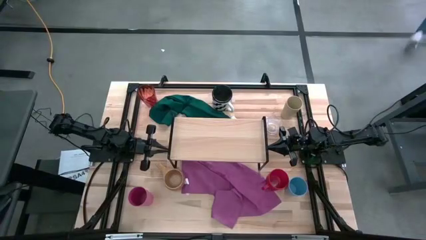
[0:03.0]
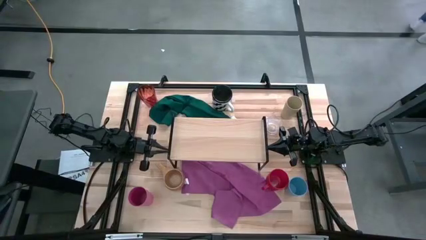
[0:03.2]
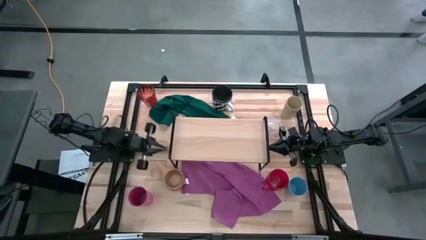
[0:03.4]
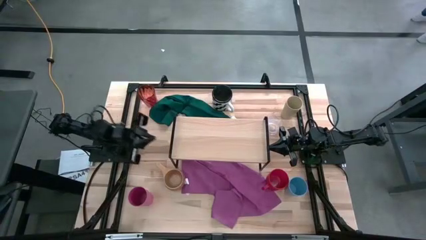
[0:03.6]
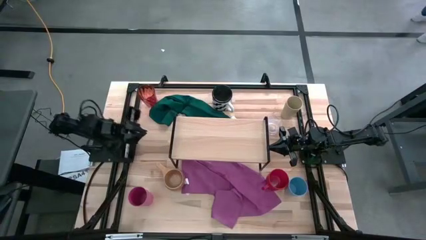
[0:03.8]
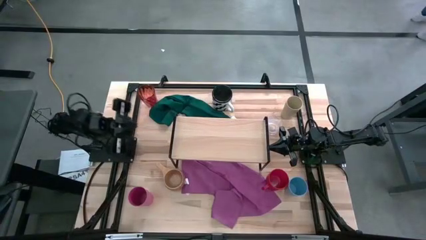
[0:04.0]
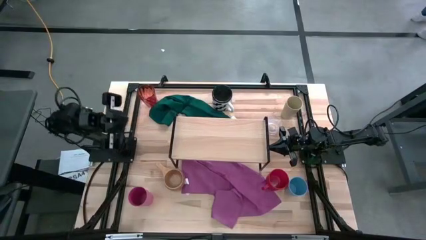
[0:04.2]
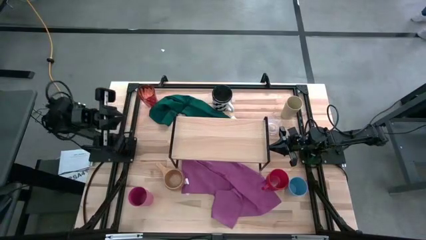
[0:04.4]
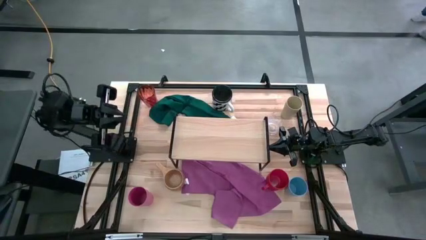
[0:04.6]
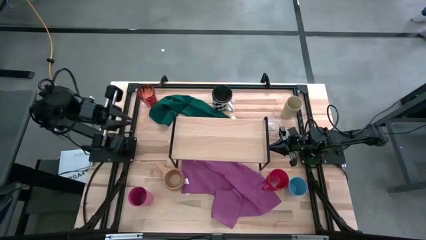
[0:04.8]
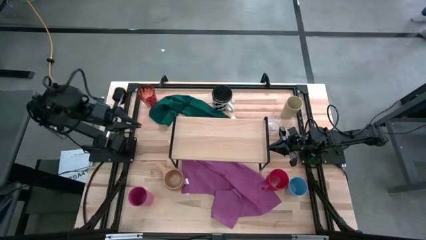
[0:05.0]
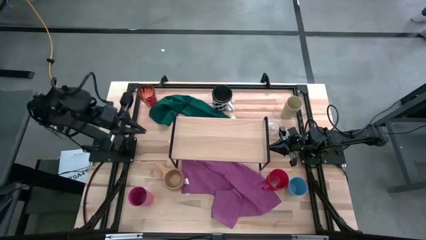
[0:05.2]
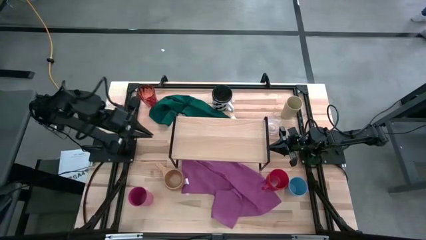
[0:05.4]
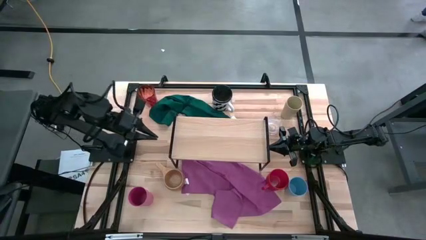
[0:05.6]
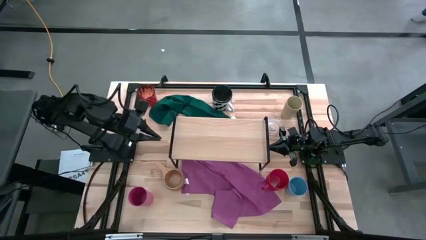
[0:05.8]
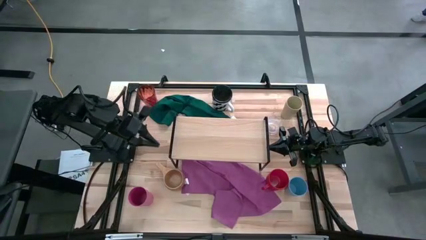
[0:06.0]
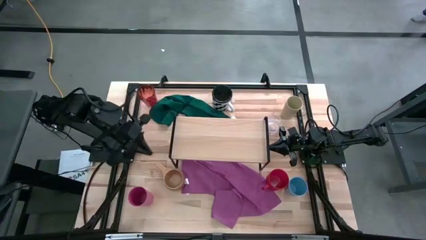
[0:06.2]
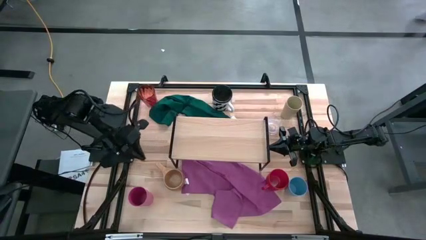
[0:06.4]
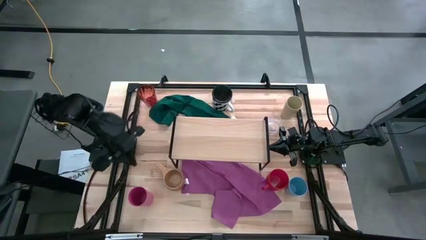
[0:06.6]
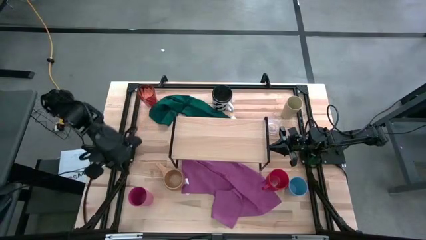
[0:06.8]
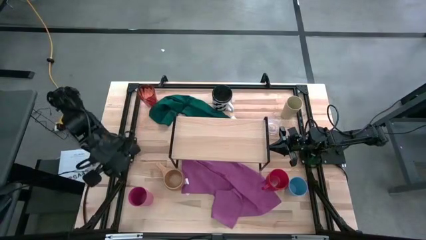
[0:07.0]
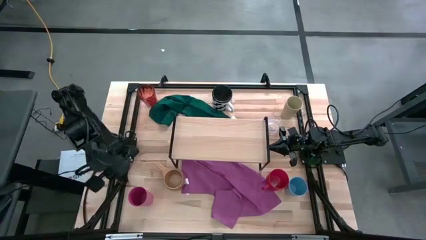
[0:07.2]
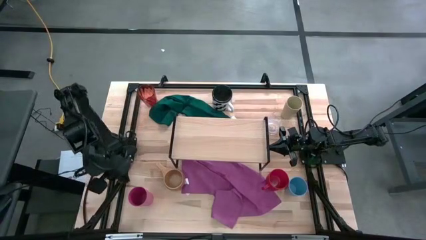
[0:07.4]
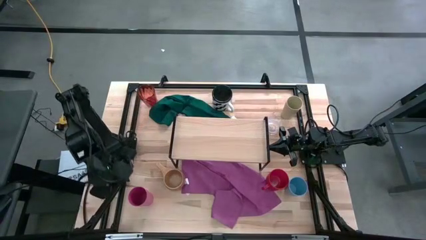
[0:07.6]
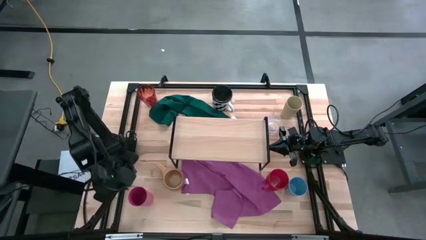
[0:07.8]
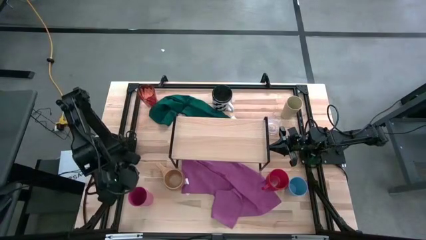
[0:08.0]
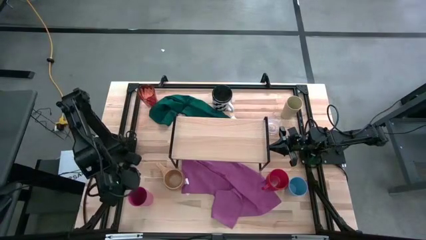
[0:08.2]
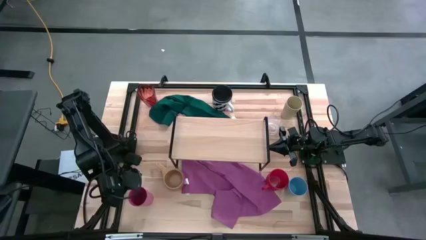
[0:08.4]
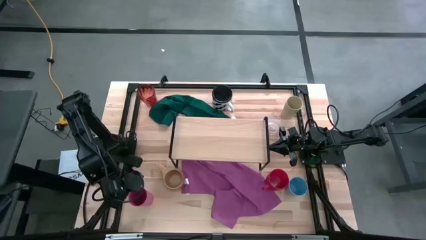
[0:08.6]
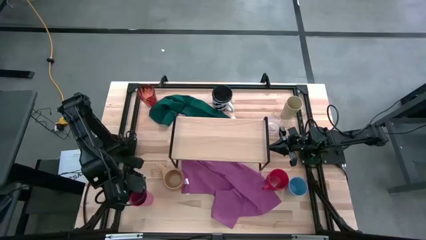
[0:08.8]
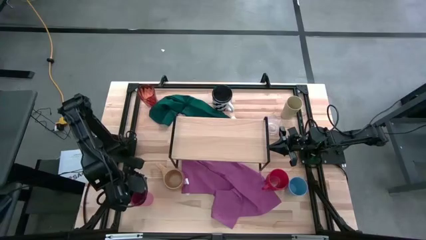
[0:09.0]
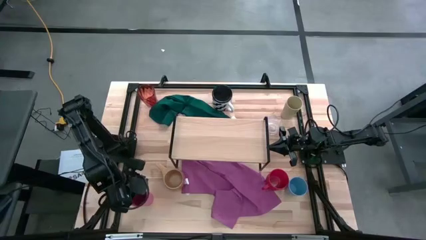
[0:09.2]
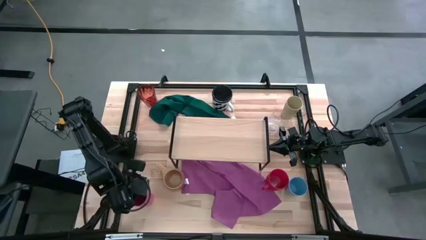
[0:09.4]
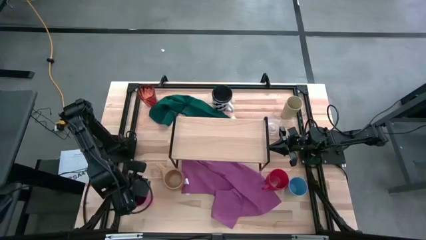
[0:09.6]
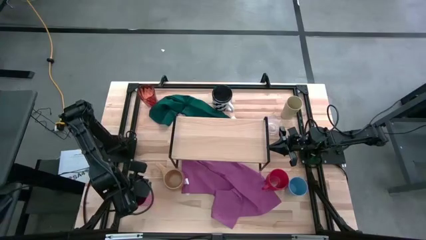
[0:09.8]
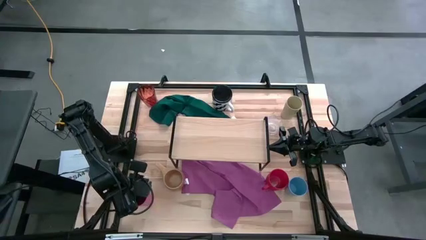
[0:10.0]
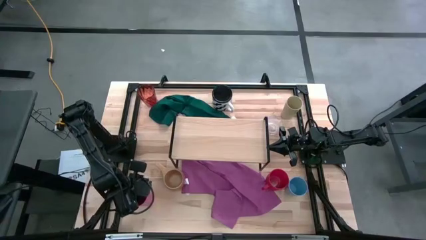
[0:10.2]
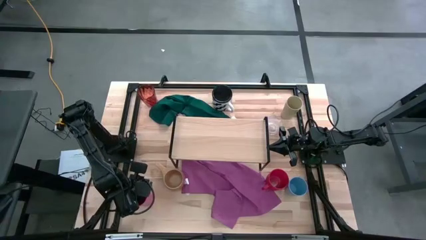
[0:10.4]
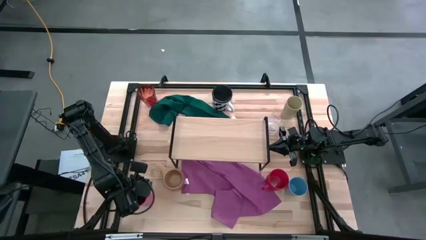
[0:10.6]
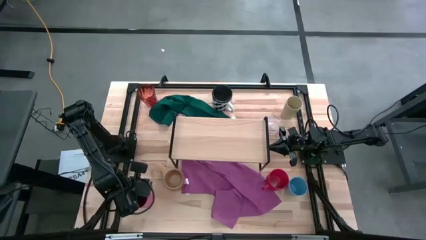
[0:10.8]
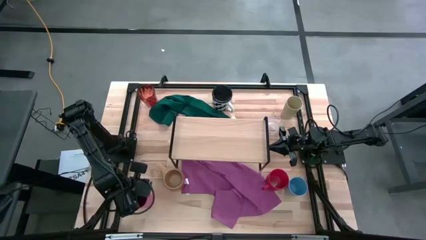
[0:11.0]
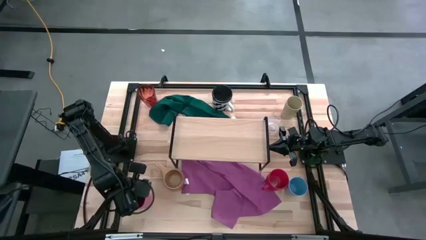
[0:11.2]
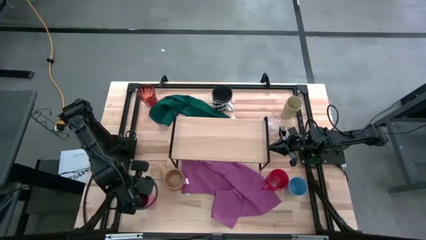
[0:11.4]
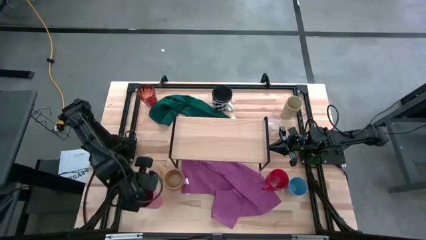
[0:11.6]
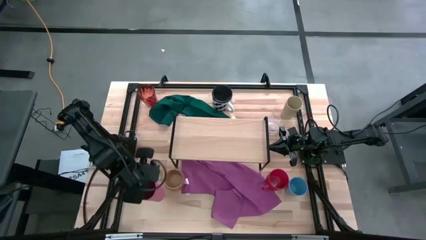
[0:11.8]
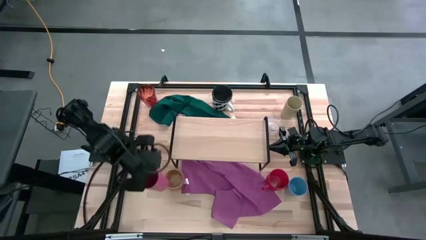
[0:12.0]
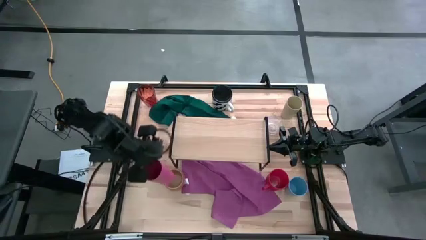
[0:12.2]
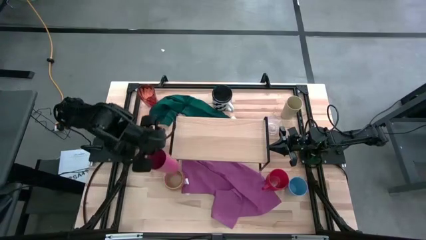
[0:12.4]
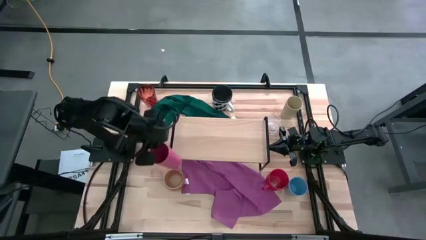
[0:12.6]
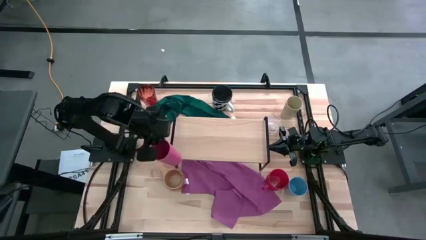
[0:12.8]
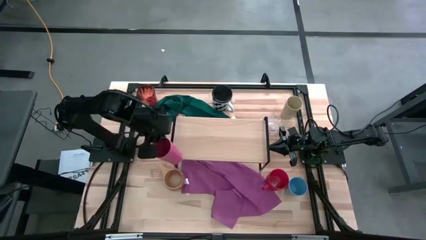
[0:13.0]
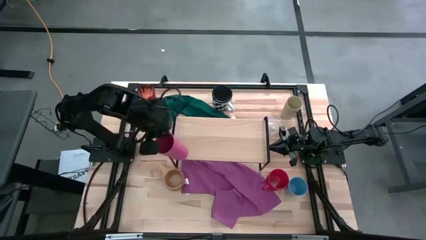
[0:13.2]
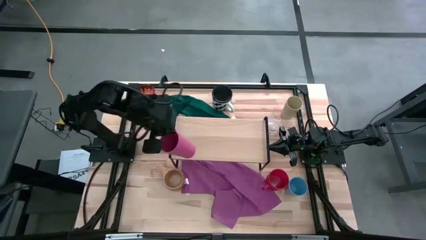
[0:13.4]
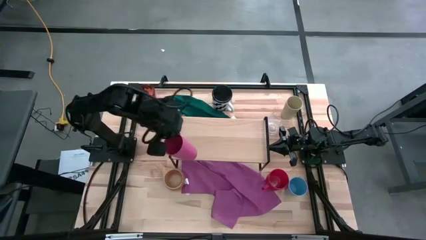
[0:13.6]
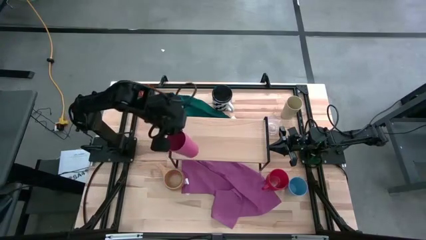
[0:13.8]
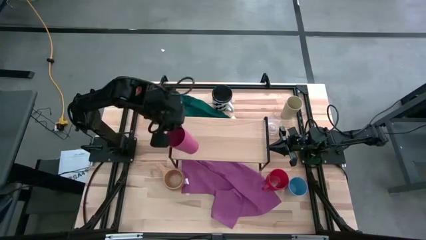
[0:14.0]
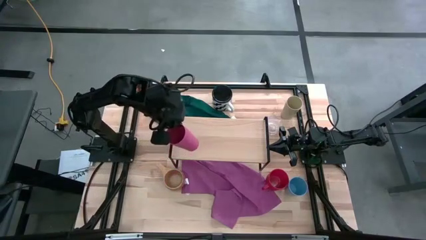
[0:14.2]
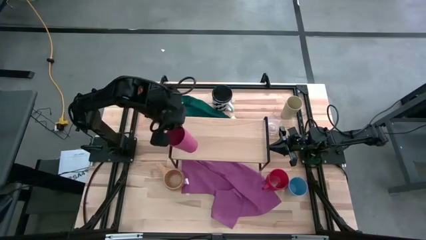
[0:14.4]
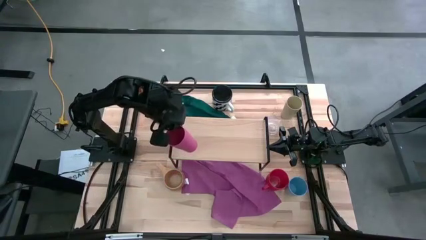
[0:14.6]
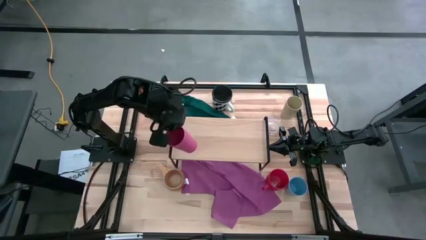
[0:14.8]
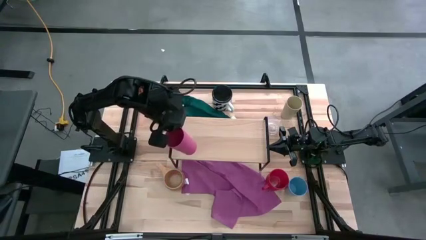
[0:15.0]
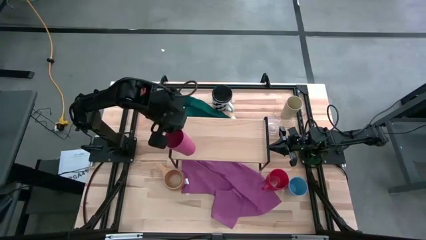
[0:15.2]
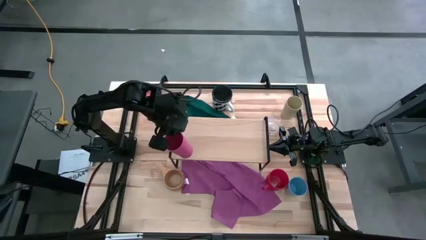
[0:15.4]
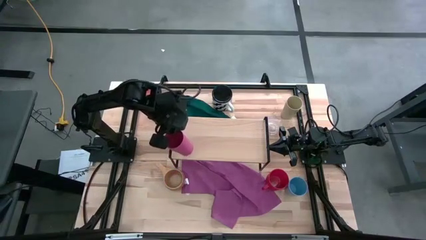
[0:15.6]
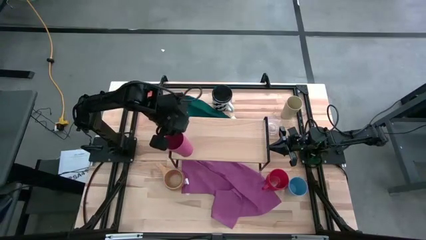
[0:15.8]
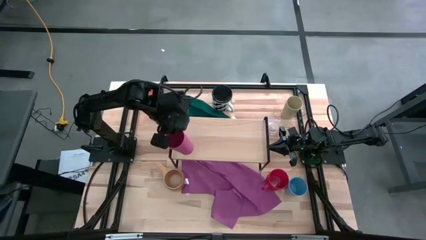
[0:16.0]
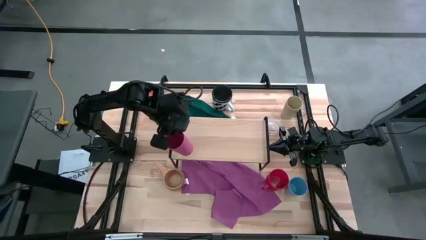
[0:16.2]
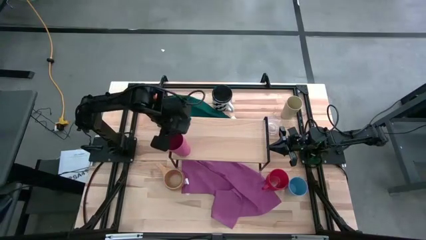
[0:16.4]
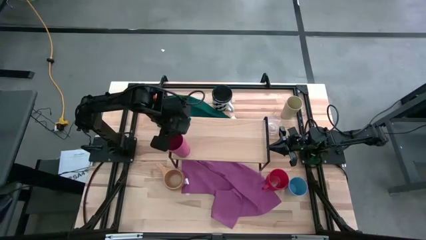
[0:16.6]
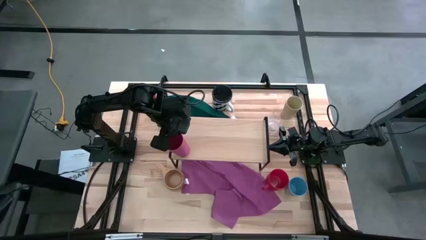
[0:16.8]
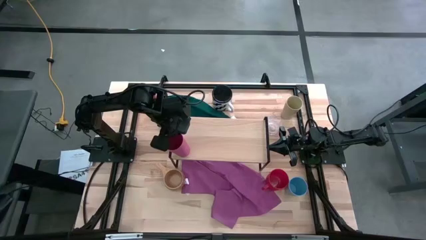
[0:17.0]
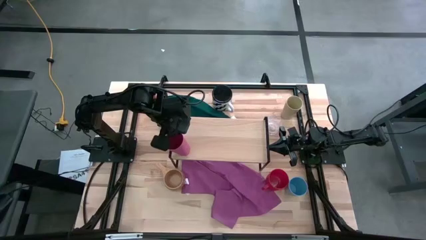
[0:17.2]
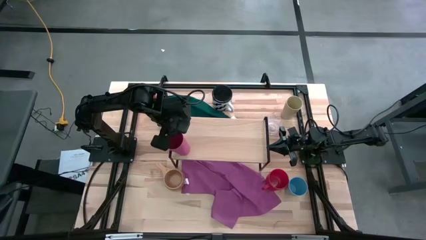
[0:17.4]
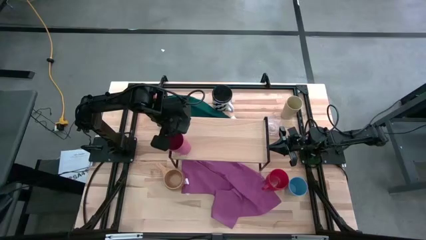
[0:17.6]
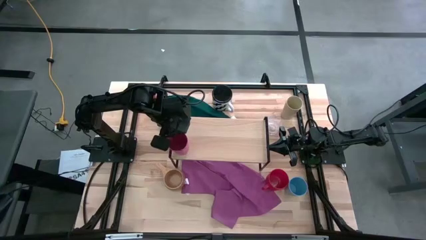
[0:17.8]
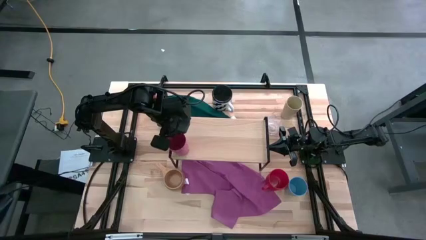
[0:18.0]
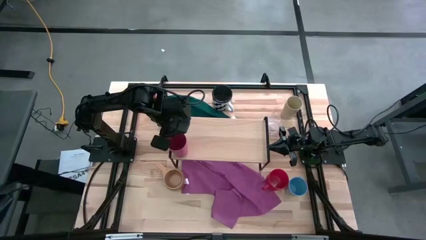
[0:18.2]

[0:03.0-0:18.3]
Task: Stack small to large cups/mugs on shelf
Put the pink cup on the shelf
